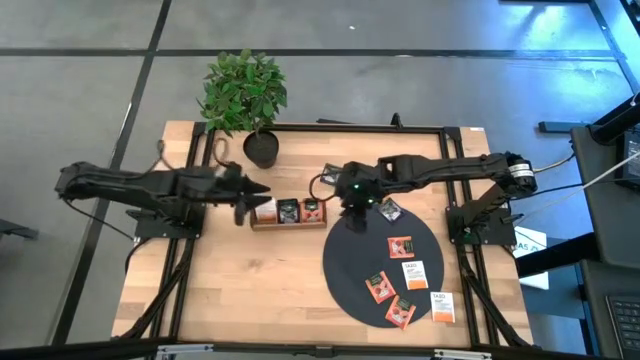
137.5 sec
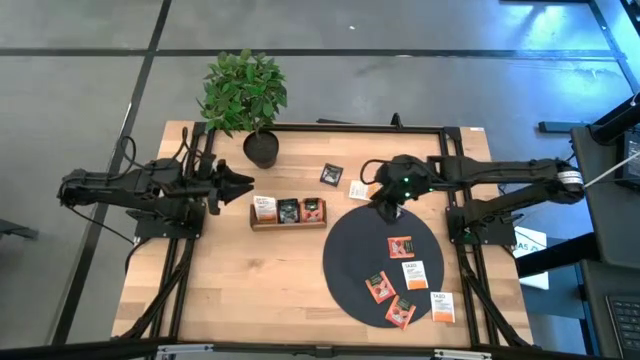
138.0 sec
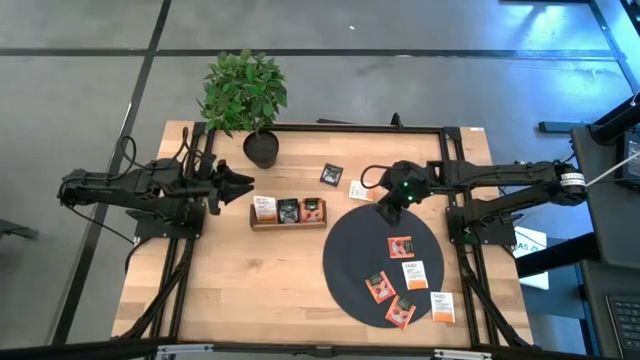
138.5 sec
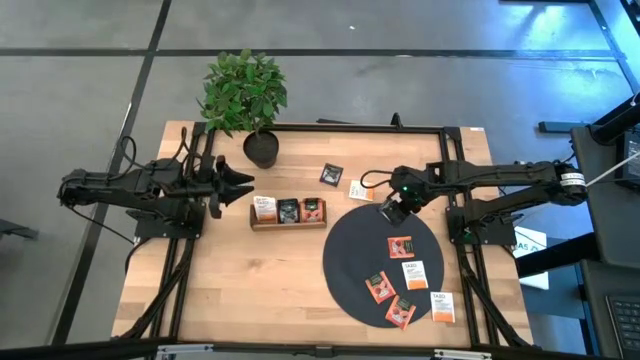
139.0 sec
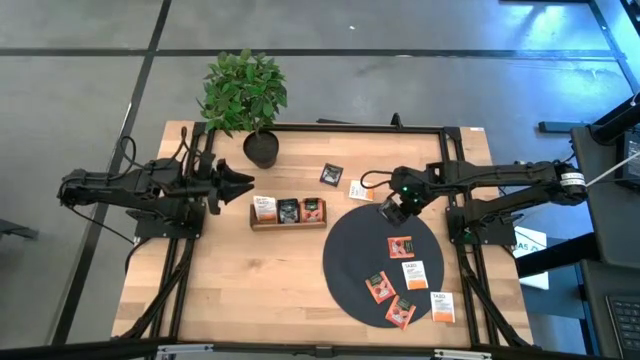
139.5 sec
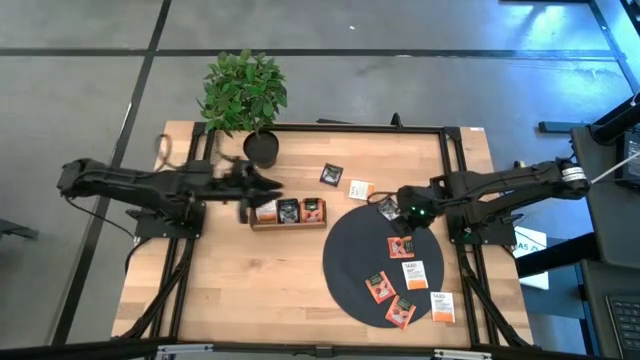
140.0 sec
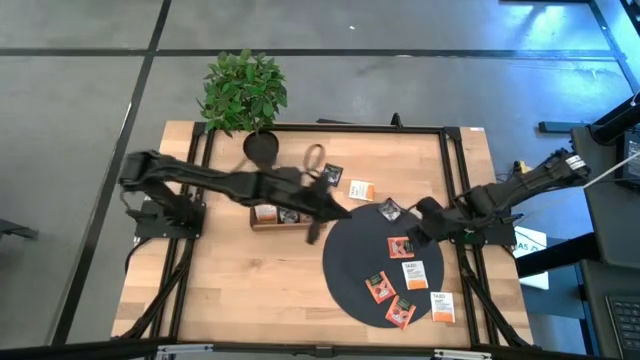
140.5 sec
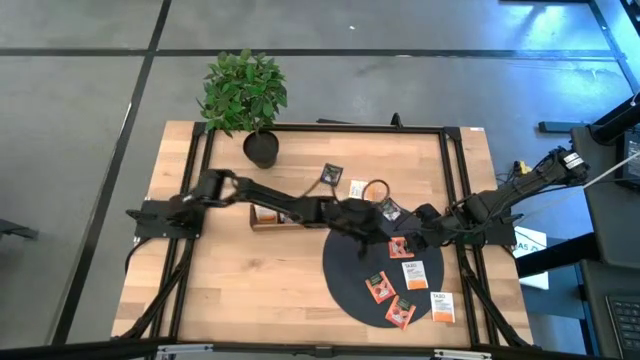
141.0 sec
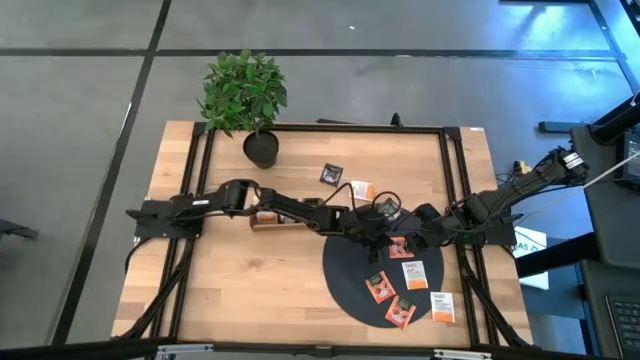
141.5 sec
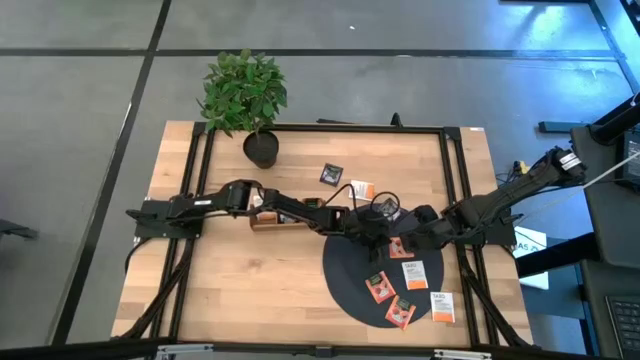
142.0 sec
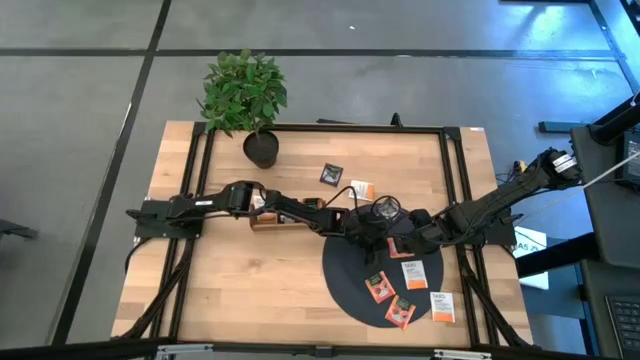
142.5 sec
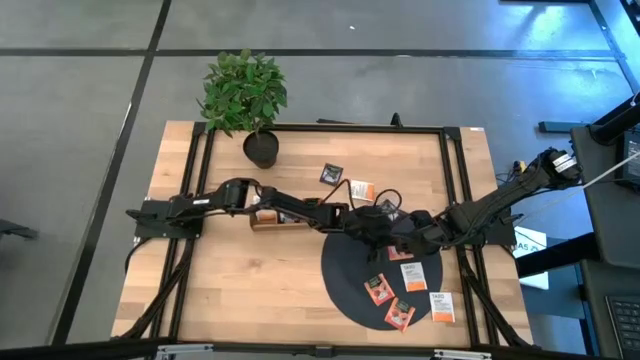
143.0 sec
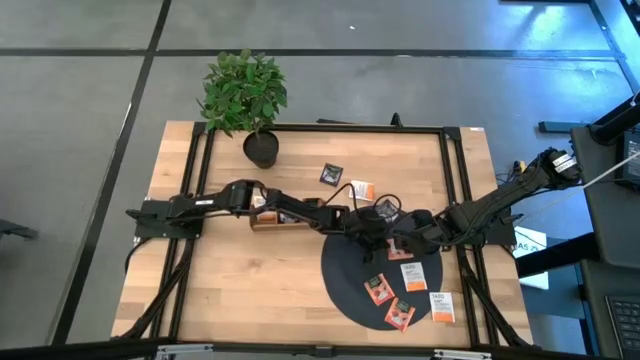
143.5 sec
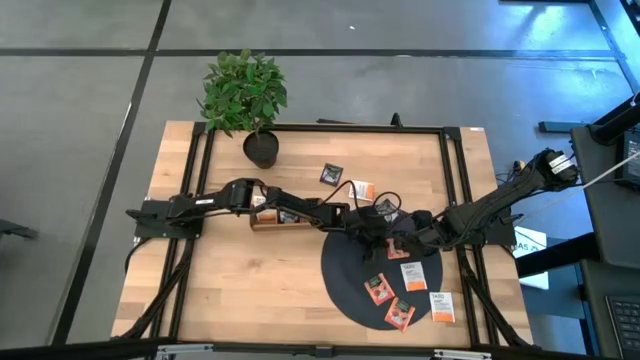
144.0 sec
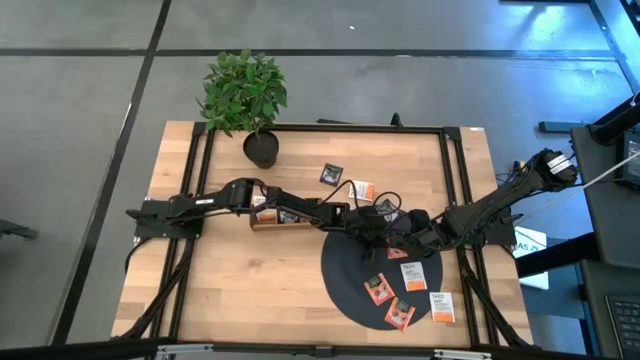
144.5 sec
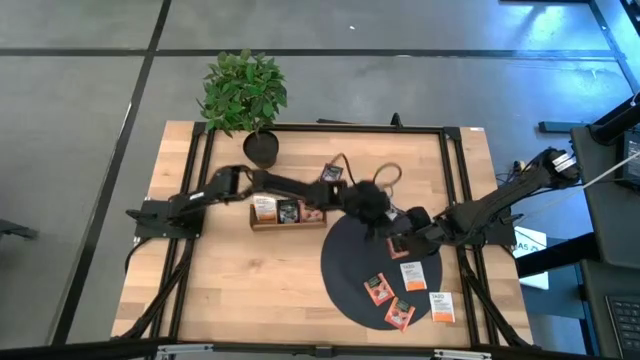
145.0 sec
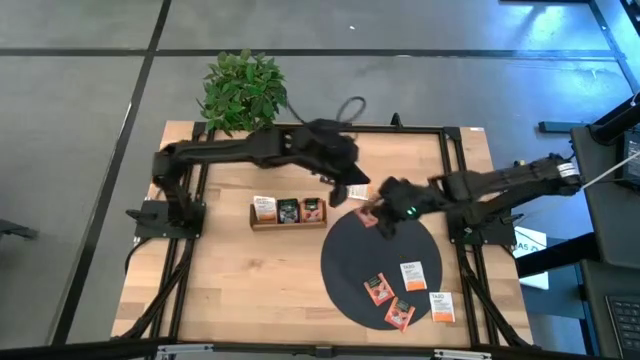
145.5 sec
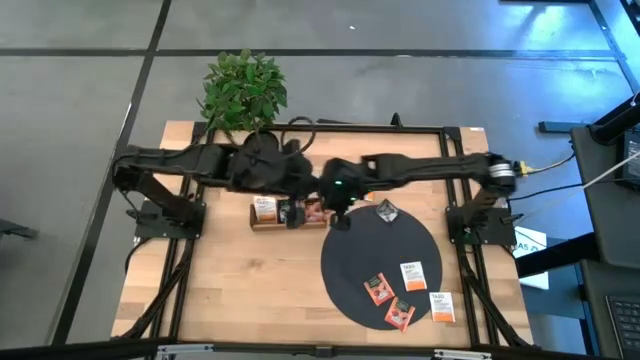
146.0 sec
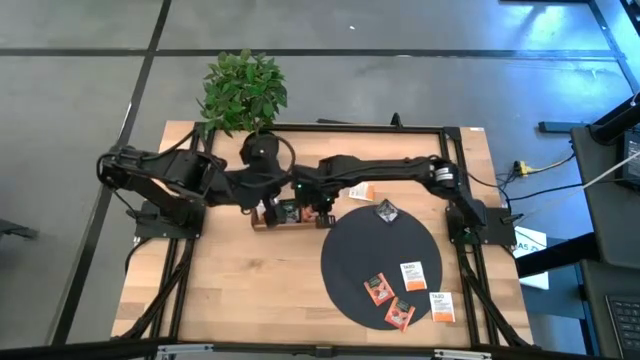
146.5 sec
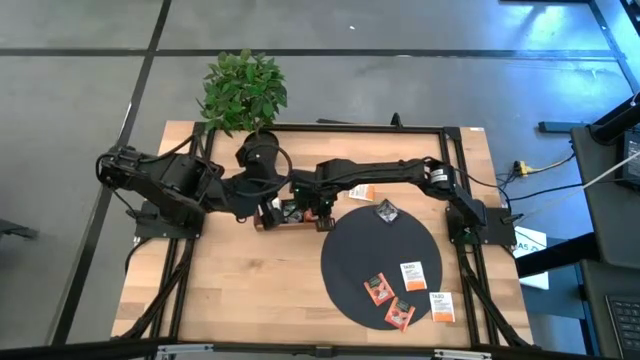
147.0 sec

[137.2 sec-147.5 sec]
Task: Pick & Place Tea
Put the top orange tea bag into the right section of the wooden organizer

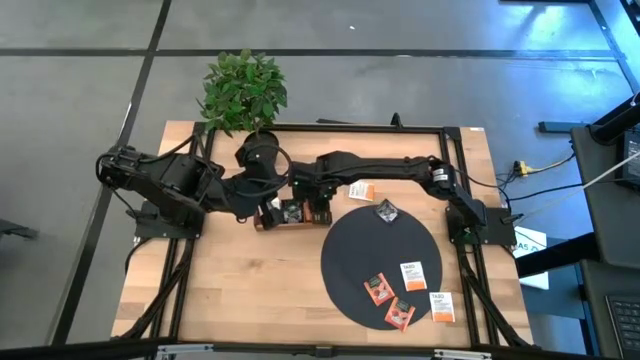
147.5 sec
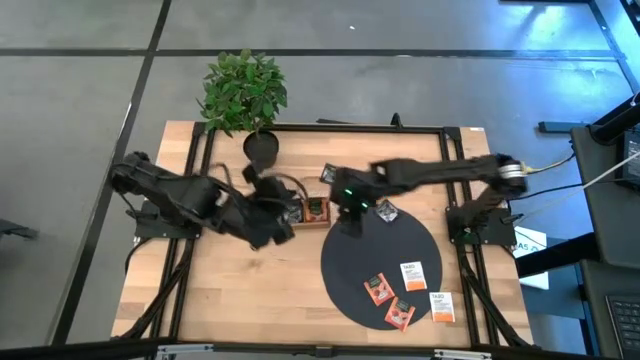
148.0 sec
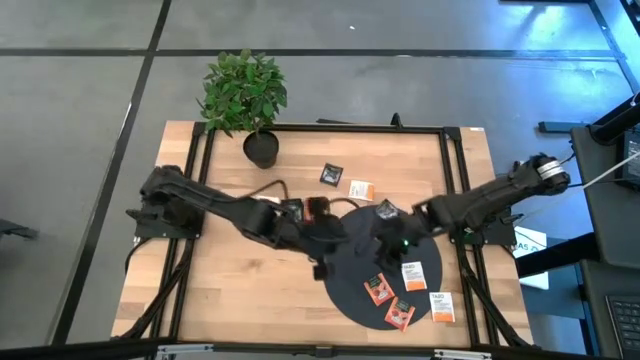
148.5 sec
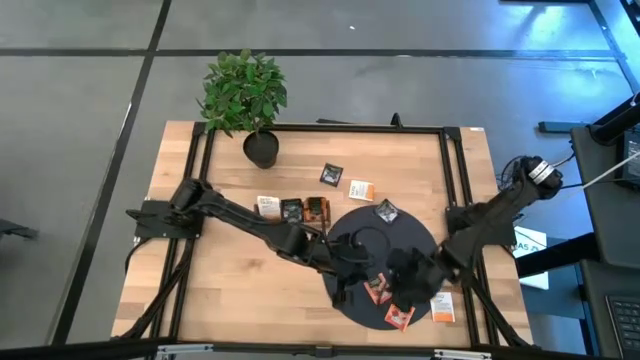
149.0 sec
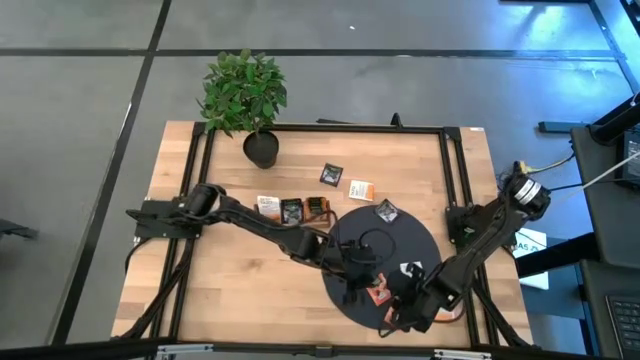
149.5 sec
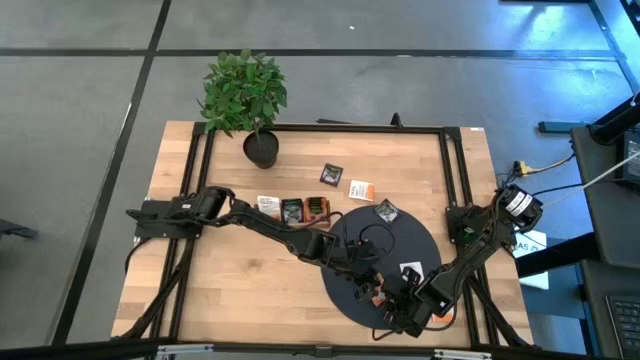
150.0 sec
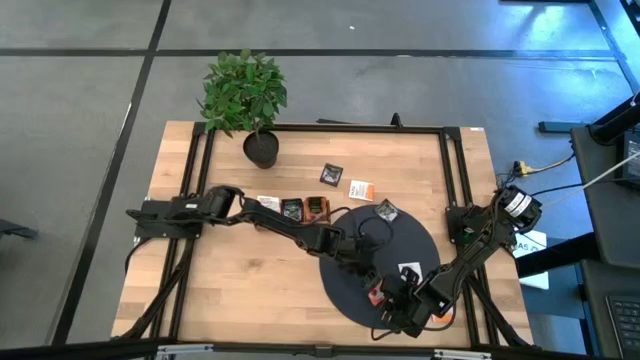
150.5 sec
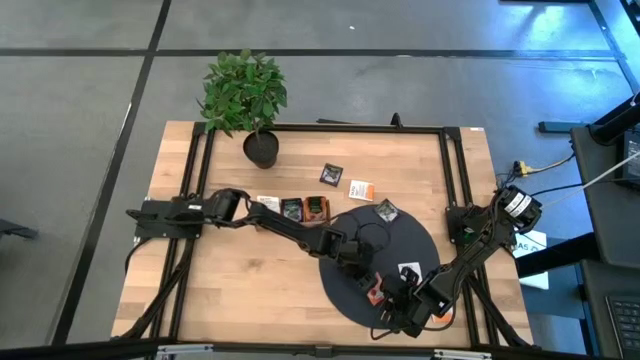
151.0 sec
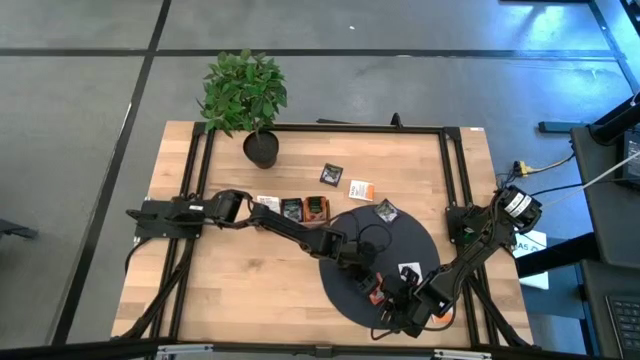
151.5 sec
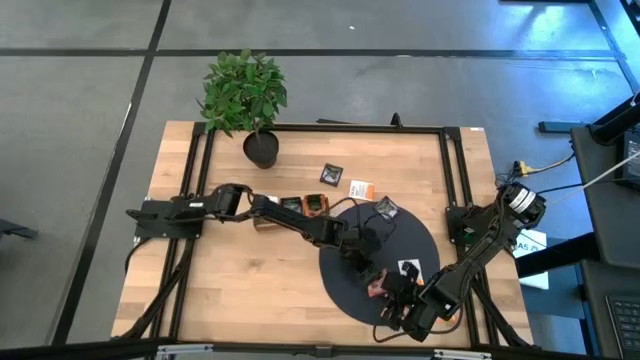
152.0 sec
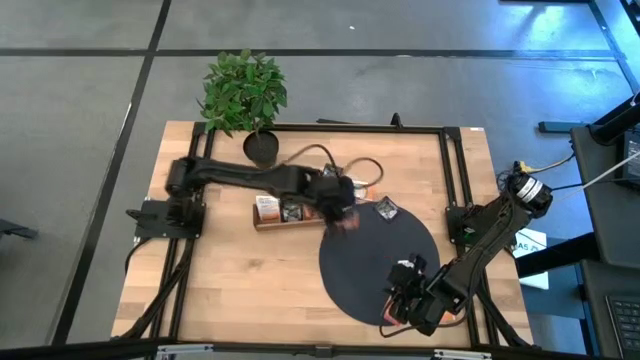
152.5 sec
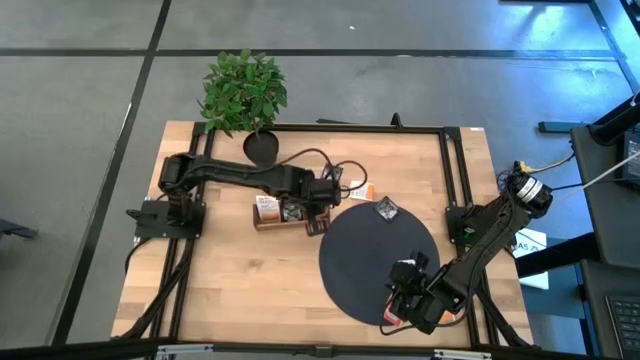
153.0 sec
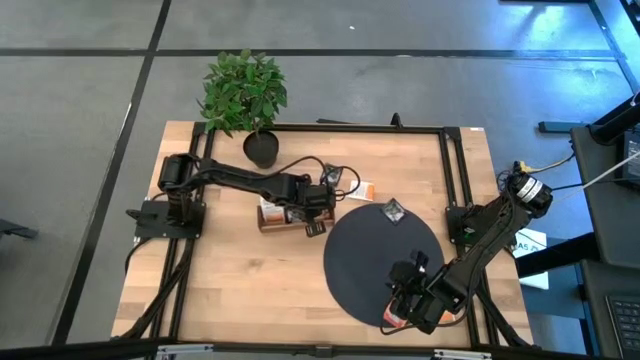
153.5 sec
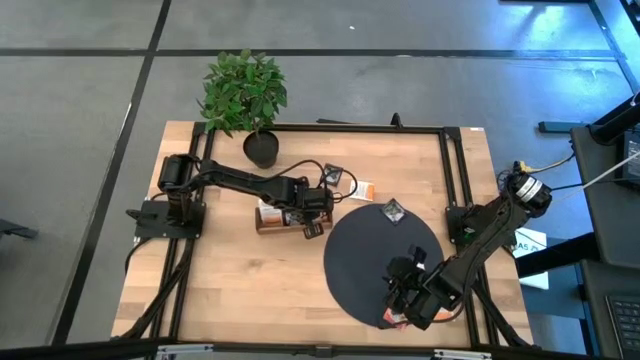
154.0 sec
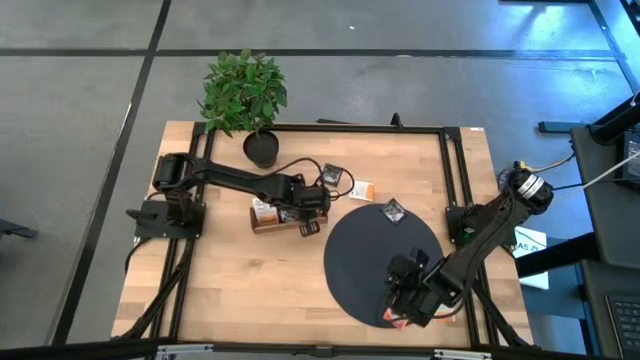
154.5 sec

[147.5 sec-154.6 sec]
Put the top orange tea bag into the right section of the wooden organizer

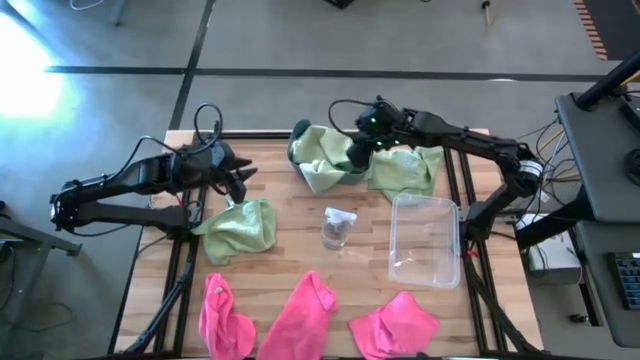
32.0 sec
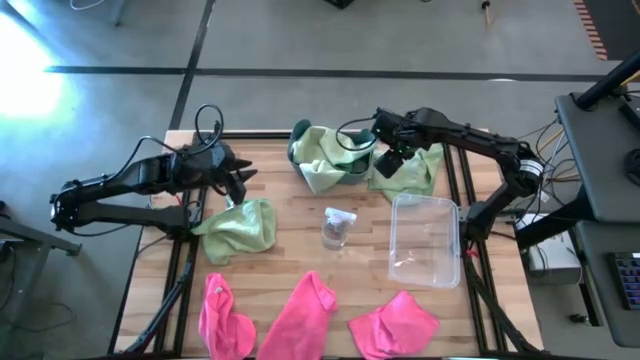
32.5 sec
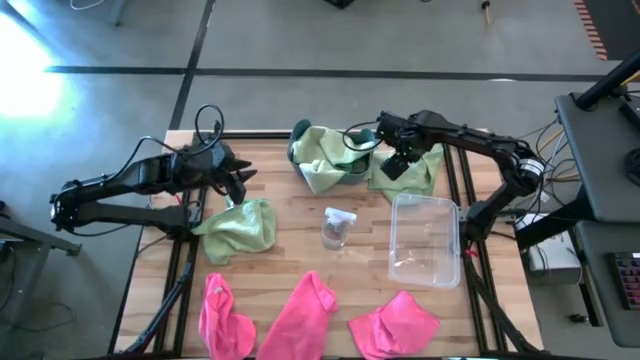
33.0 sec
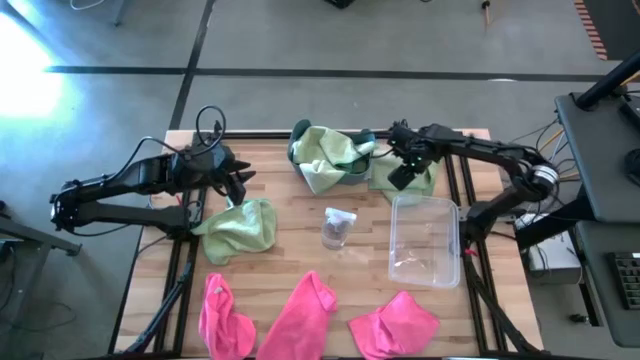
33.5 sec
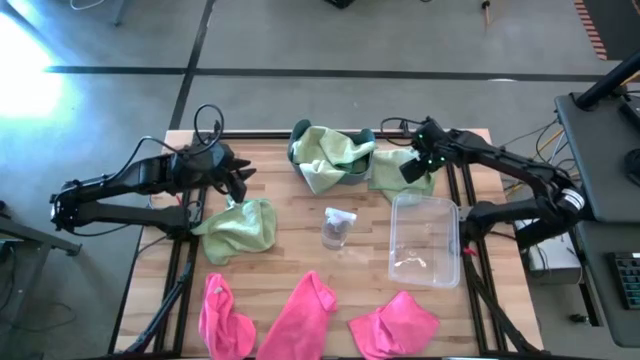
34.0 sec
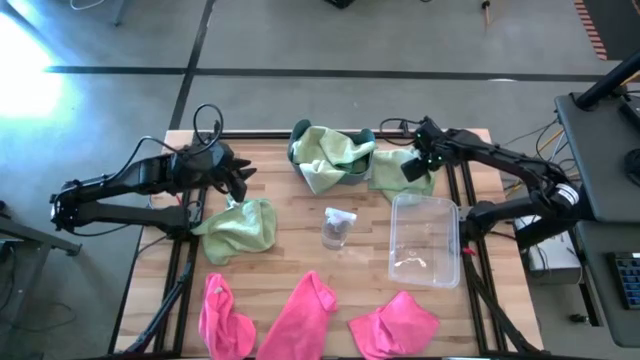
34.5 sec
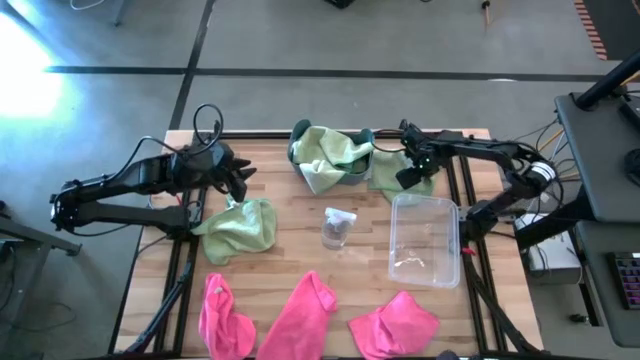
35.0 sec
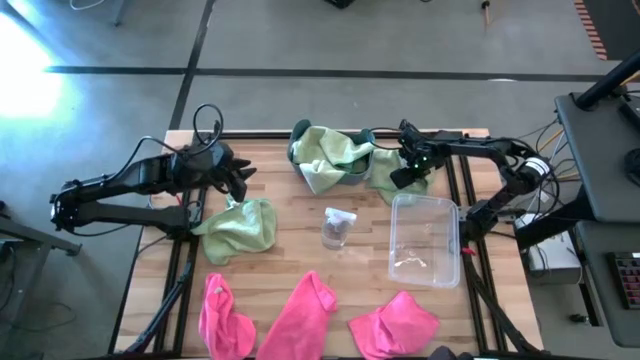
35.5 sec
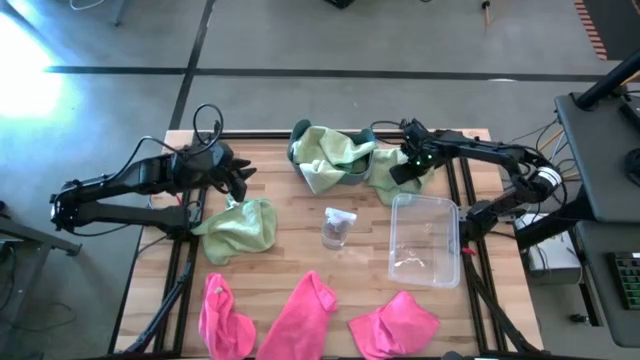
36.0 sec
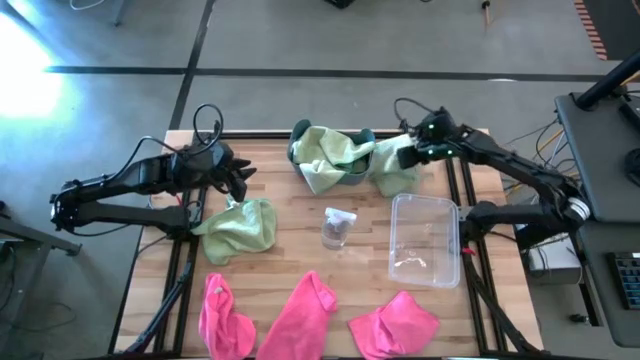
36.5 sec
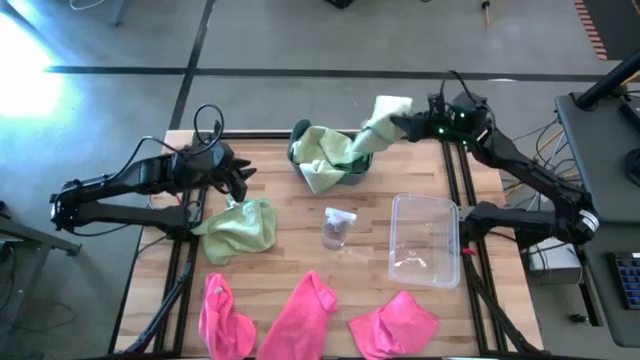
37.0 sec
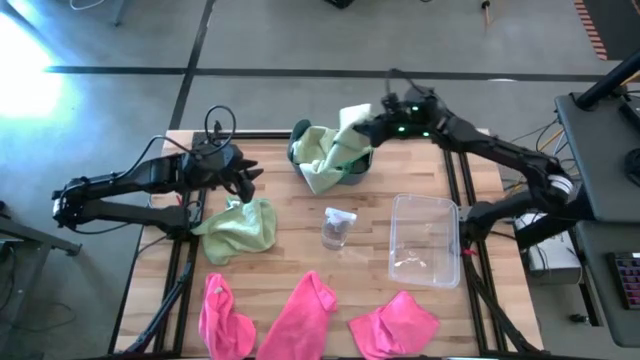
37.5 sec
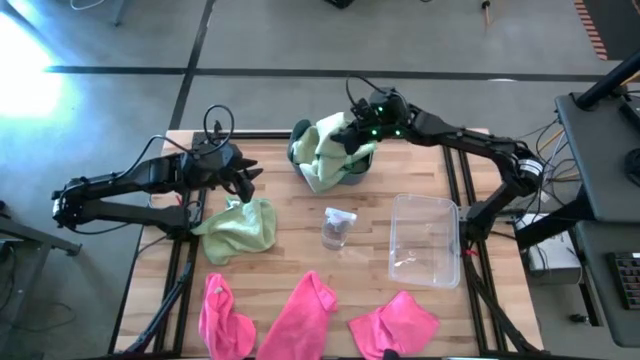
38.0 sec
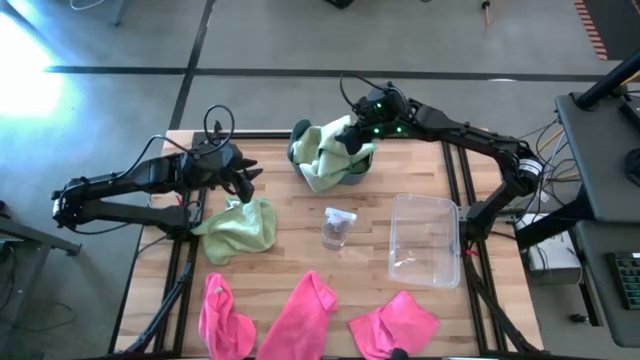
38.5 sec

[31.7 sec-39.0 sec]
Task: Sort microfiber towel by color & place in baskets
Put the green microfiber towel into the blue bin
